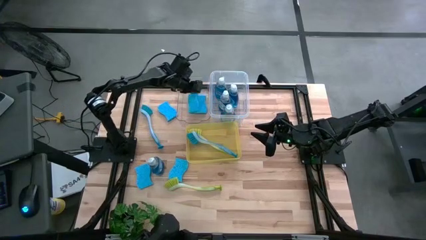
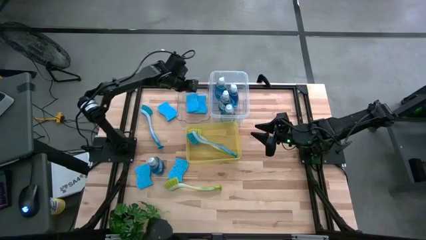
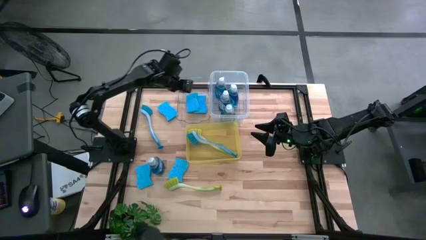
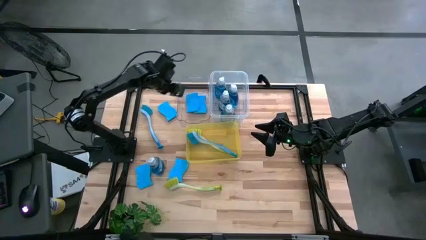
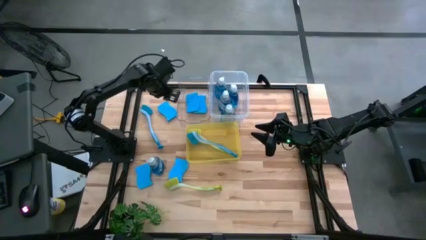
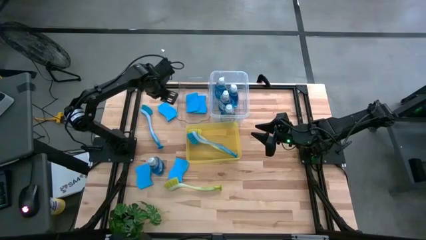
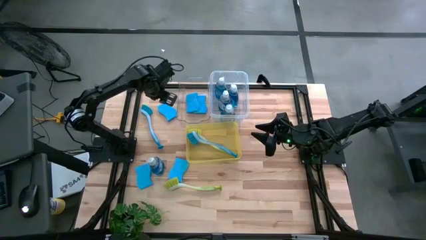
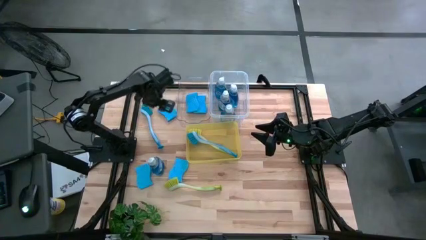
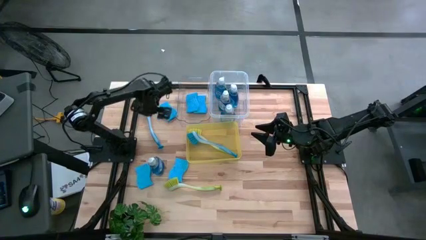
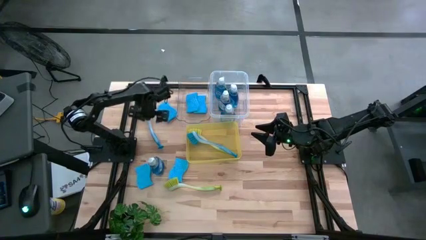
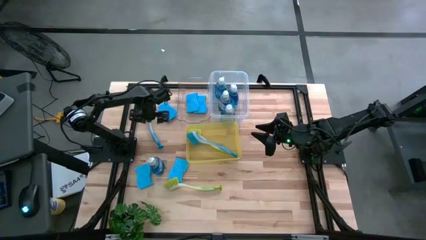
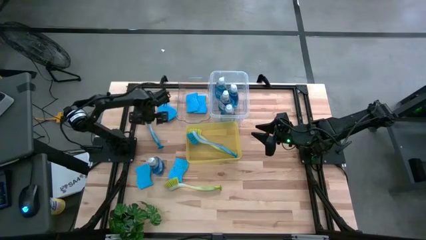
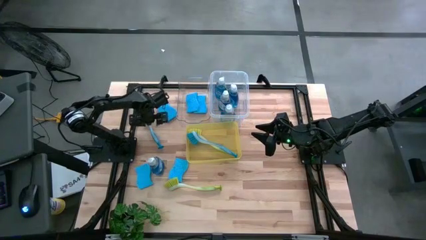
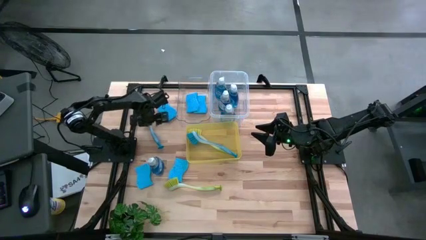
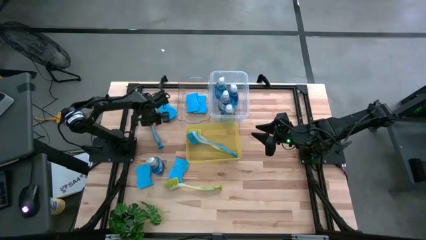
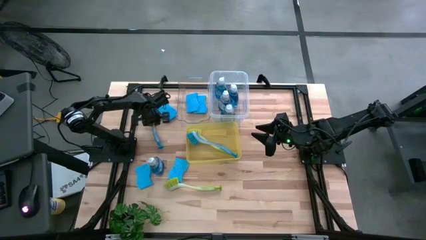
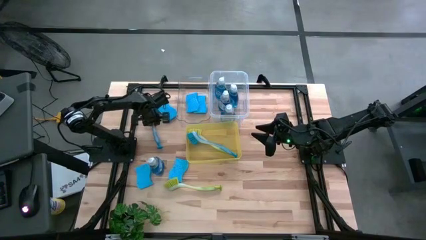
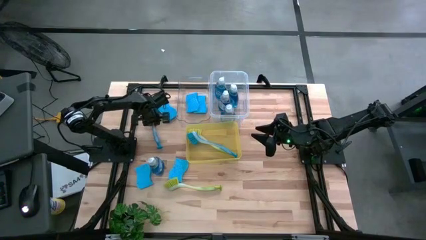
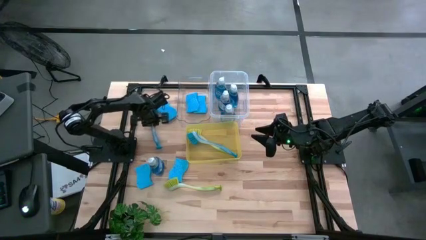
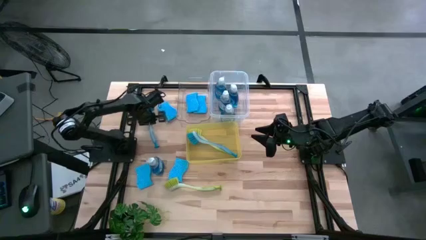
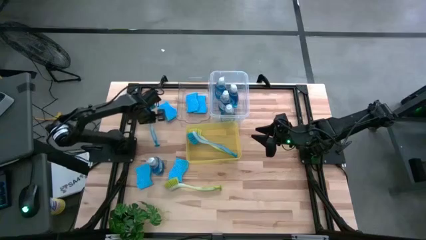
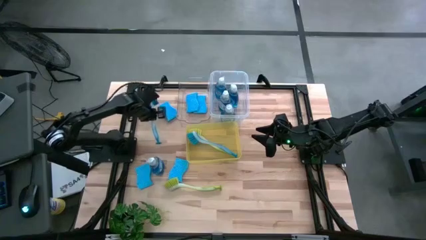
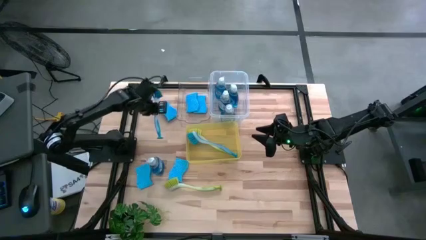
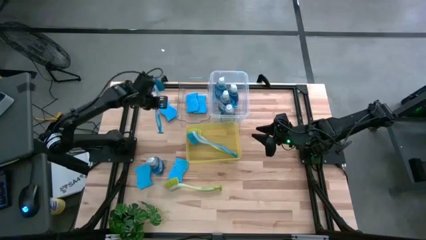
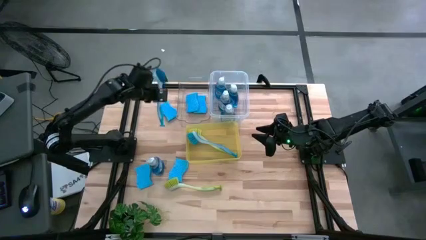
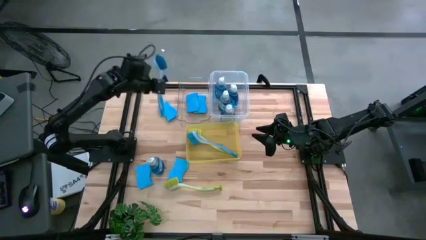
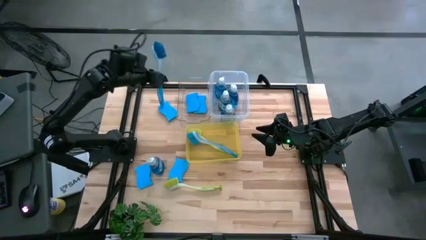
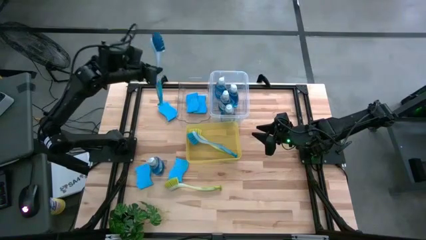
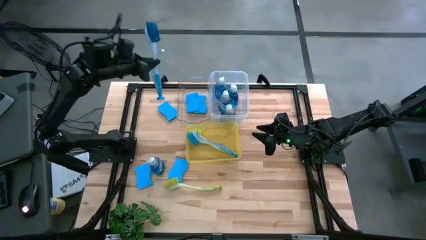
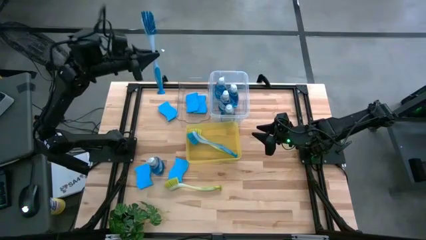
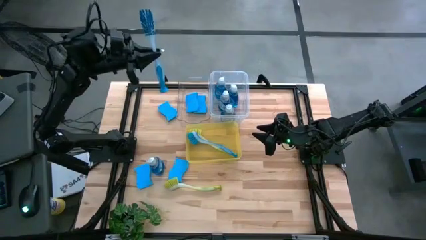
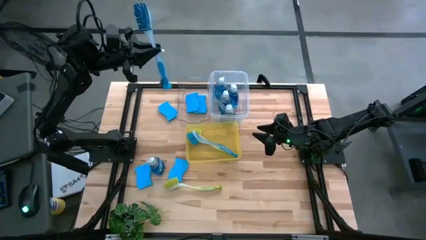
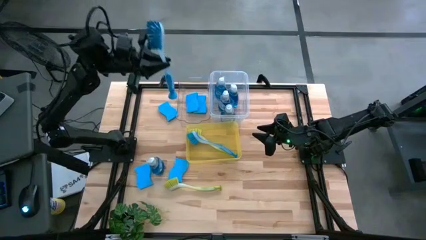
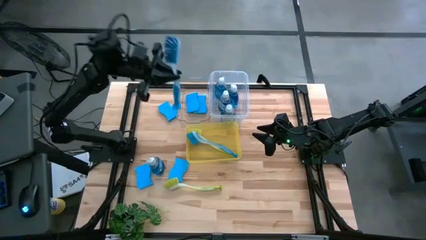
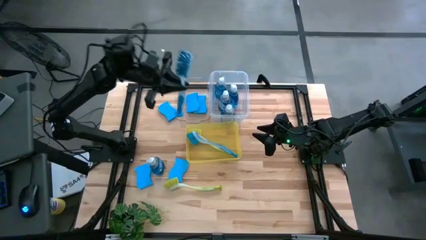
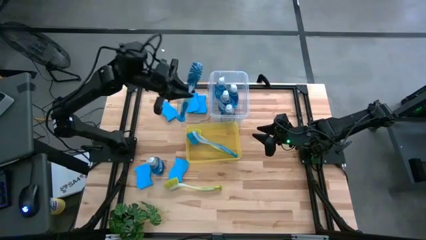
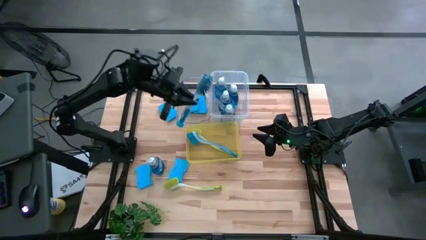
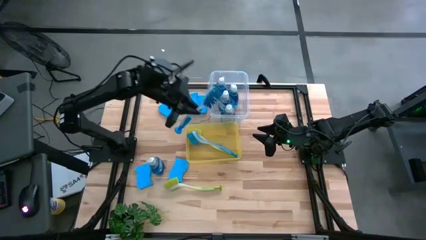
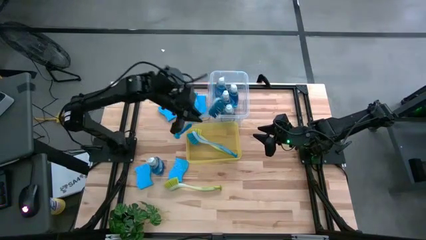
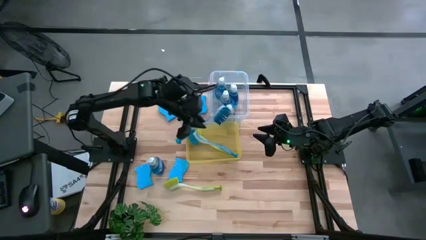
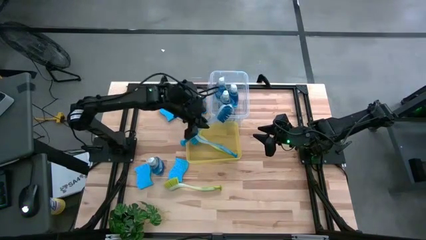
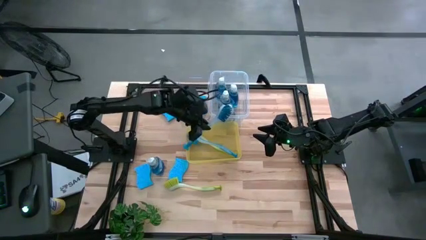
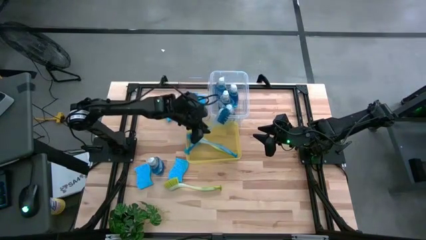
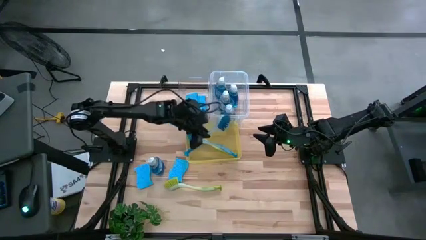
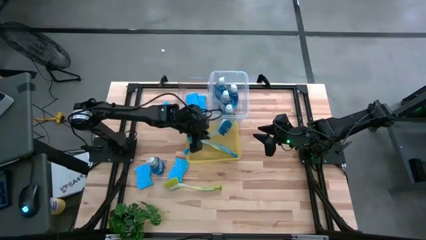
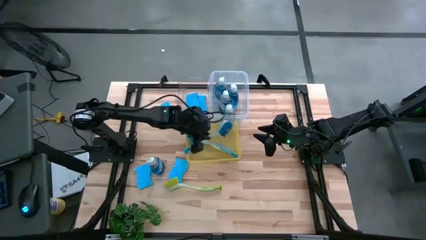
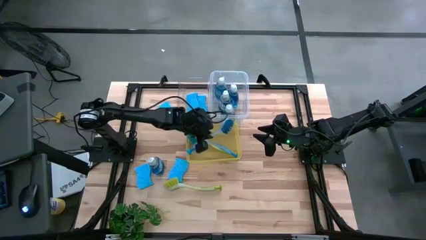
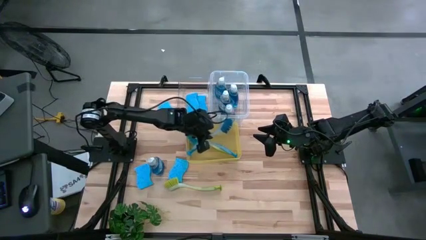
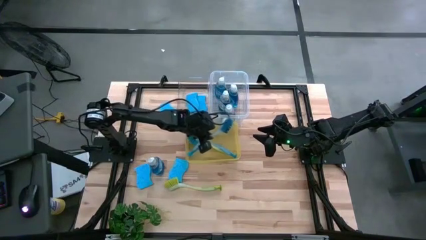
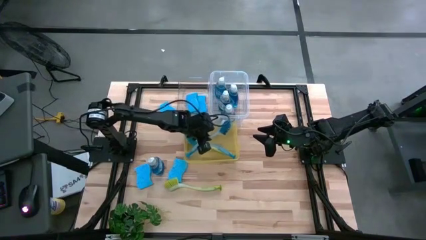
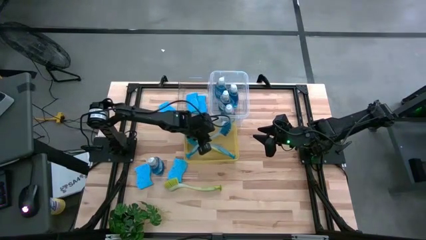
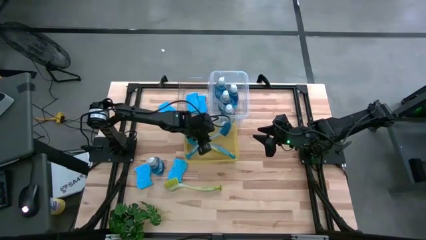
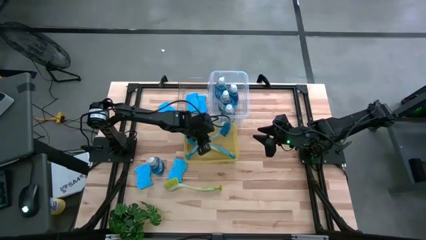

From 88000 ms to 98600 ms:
Task: Pick & Place Kitchen Sink Supplies
Put the blue toilet brush into the yellow bin
